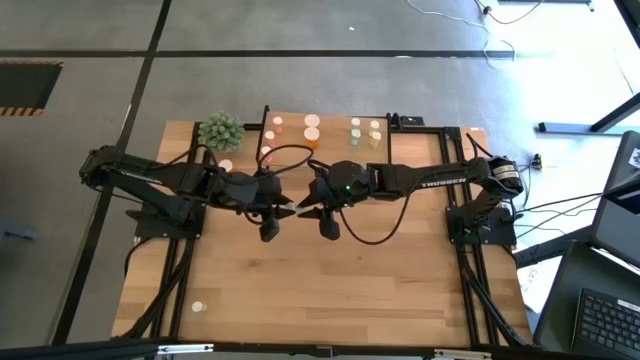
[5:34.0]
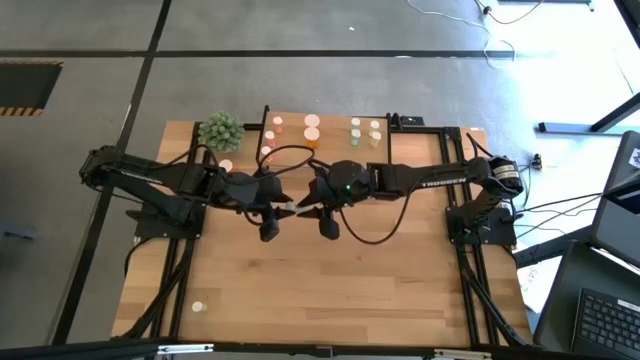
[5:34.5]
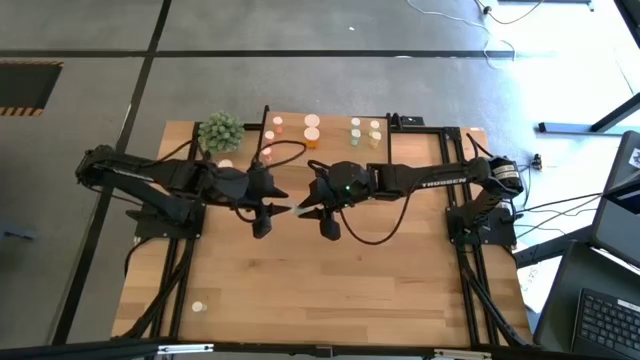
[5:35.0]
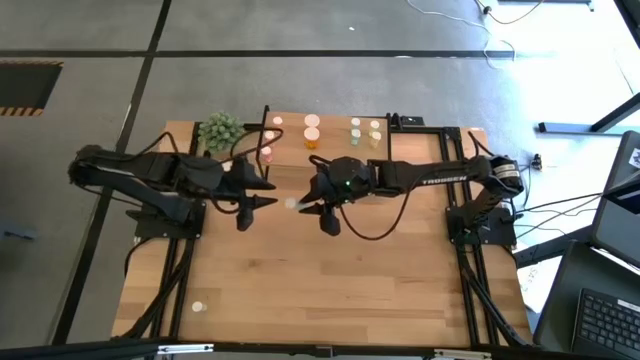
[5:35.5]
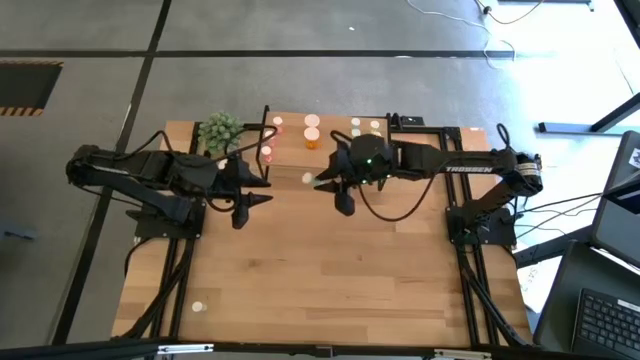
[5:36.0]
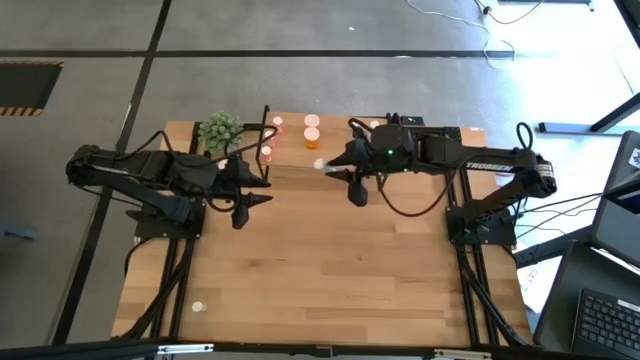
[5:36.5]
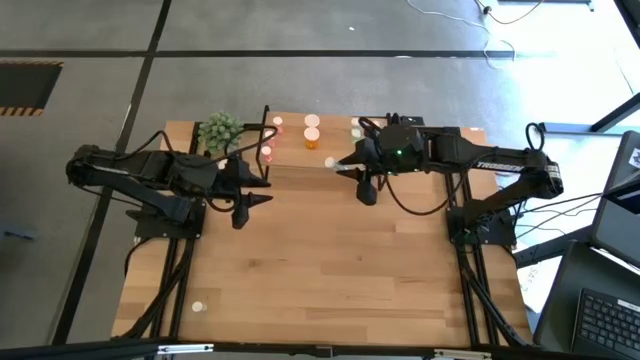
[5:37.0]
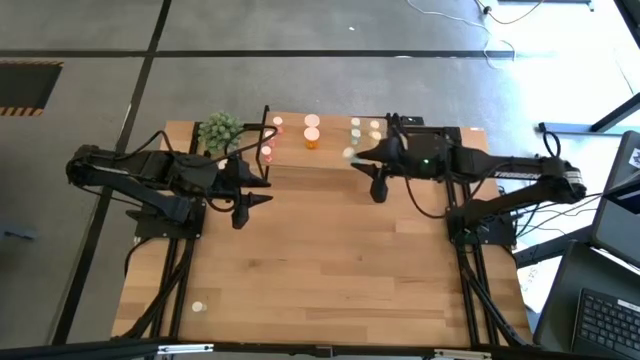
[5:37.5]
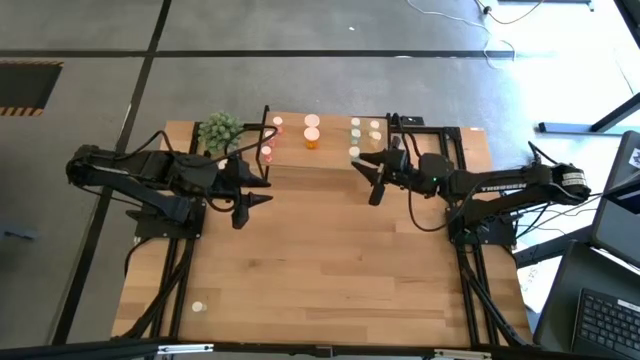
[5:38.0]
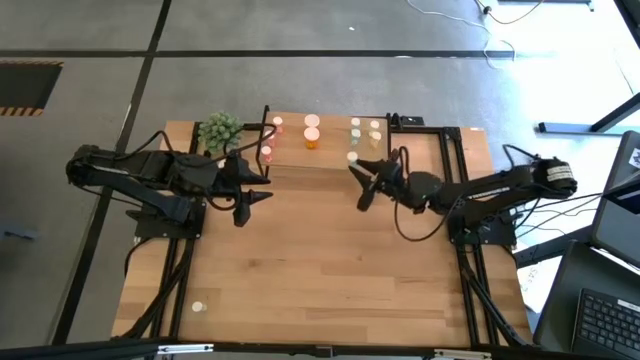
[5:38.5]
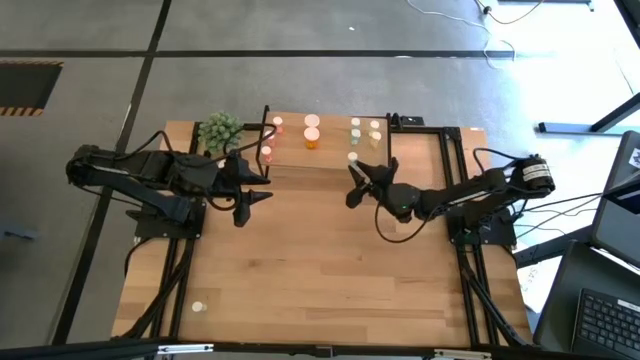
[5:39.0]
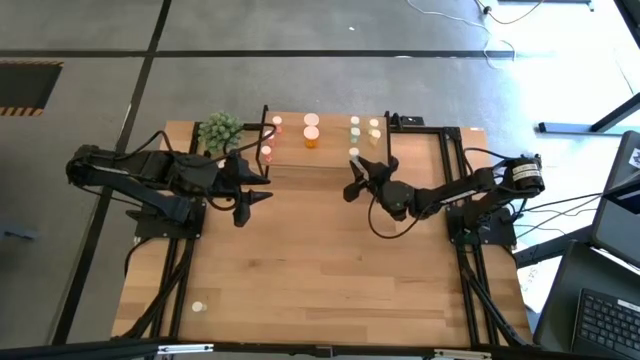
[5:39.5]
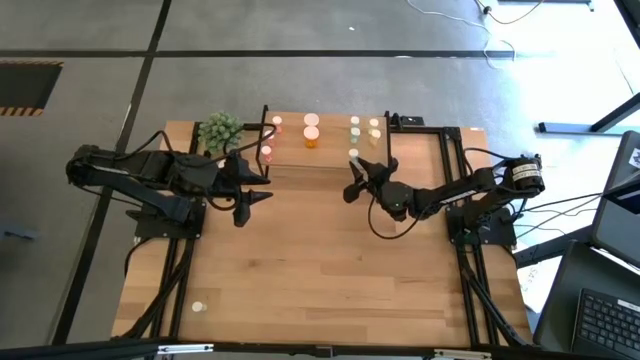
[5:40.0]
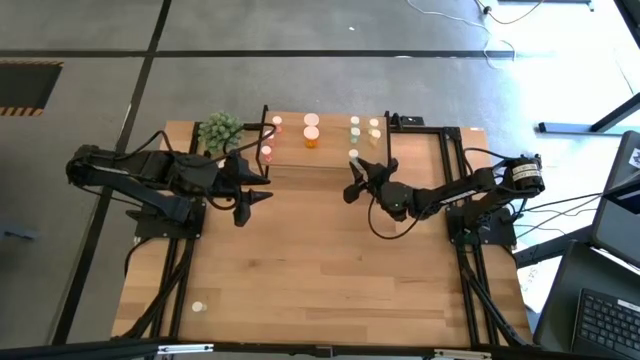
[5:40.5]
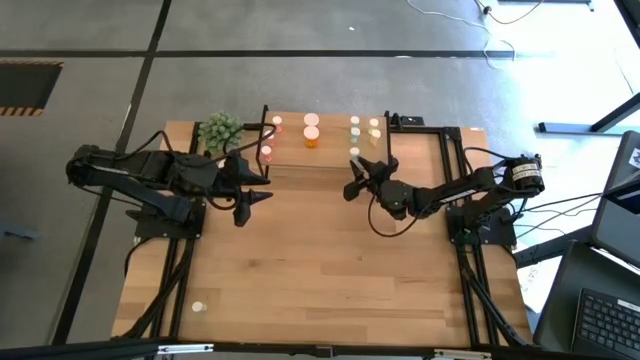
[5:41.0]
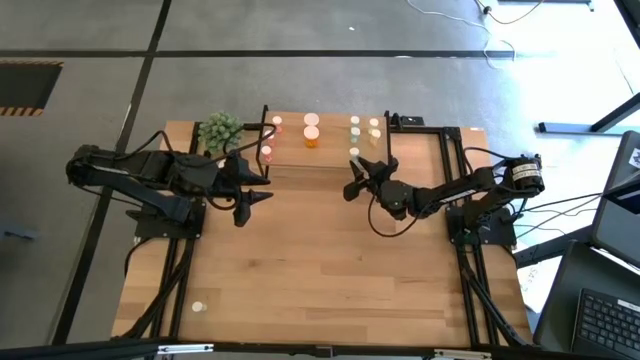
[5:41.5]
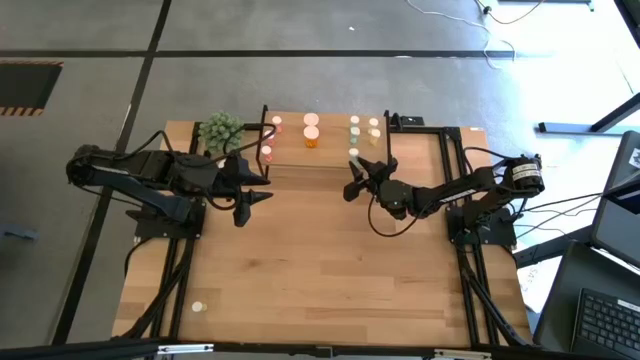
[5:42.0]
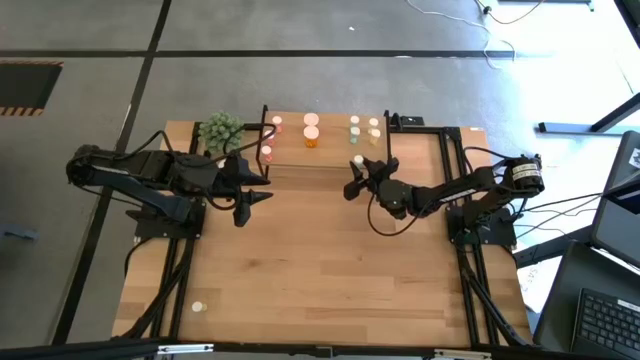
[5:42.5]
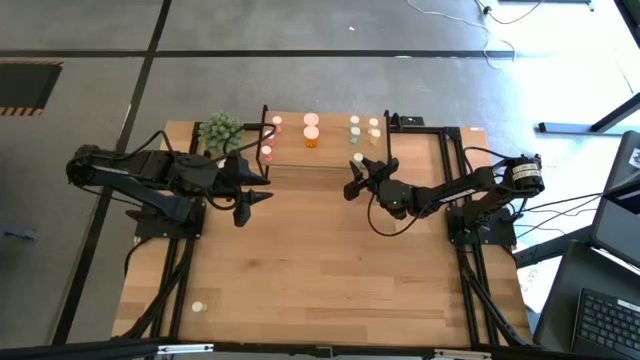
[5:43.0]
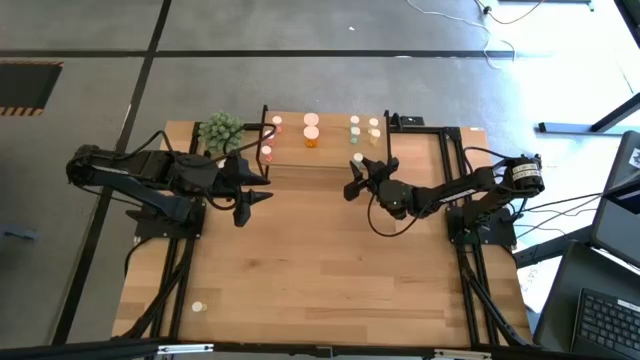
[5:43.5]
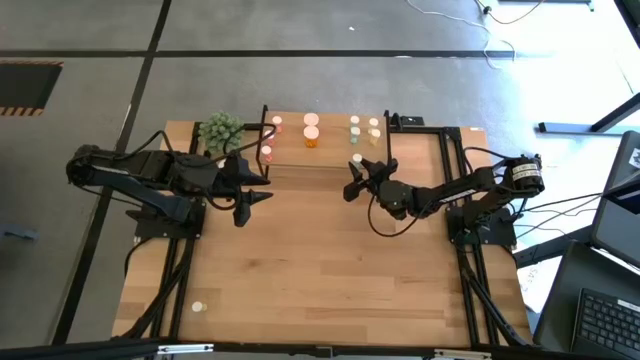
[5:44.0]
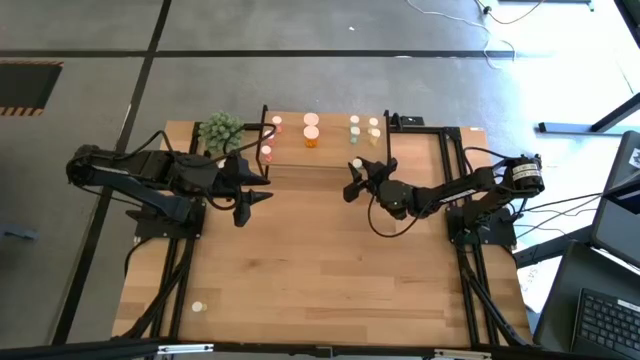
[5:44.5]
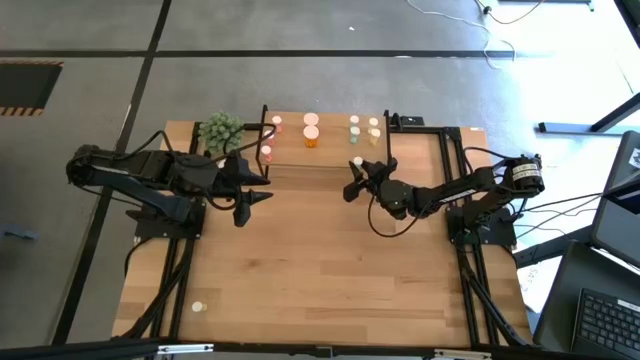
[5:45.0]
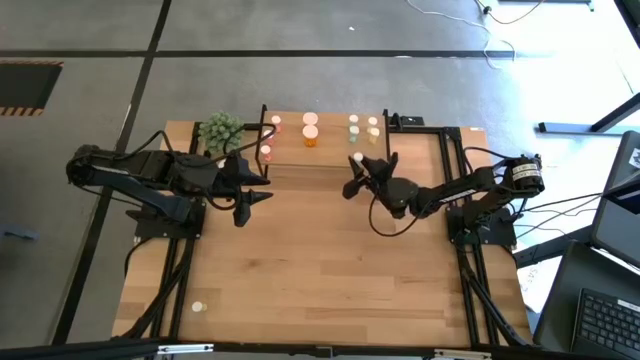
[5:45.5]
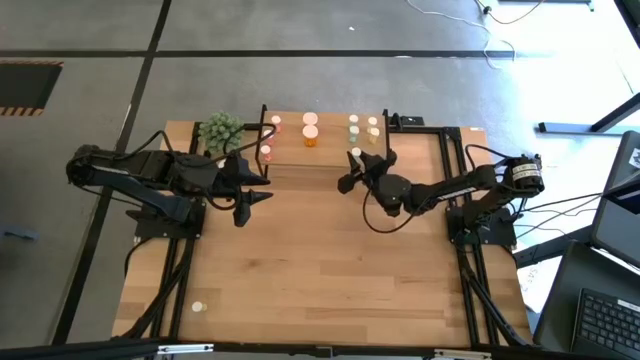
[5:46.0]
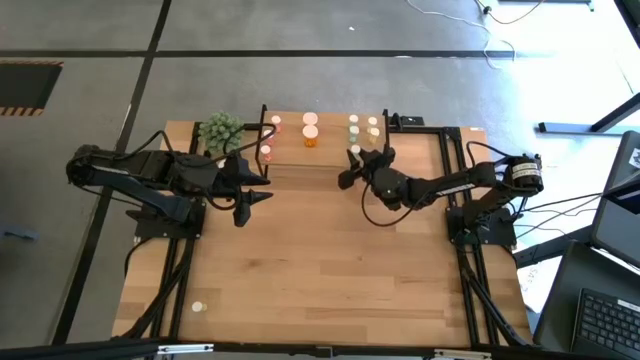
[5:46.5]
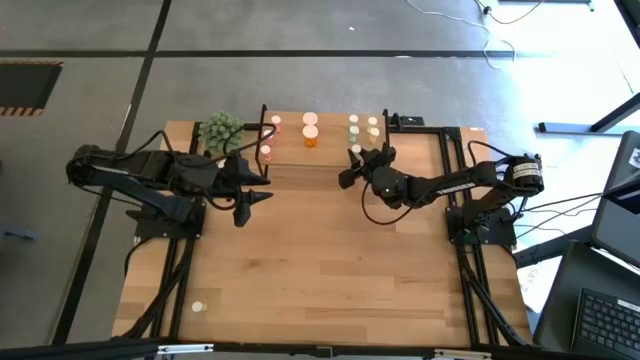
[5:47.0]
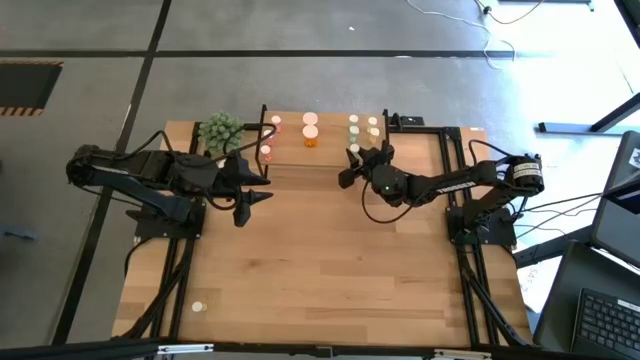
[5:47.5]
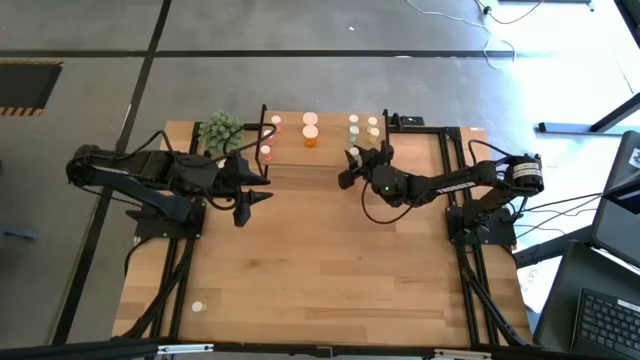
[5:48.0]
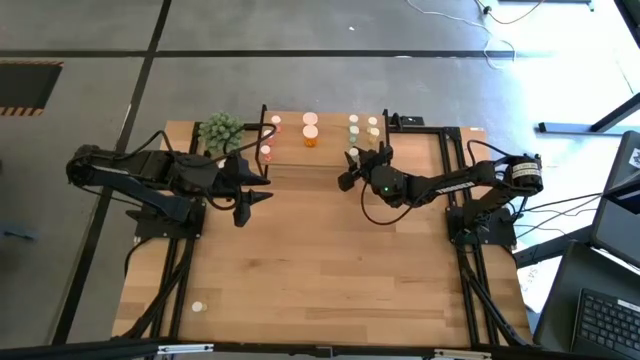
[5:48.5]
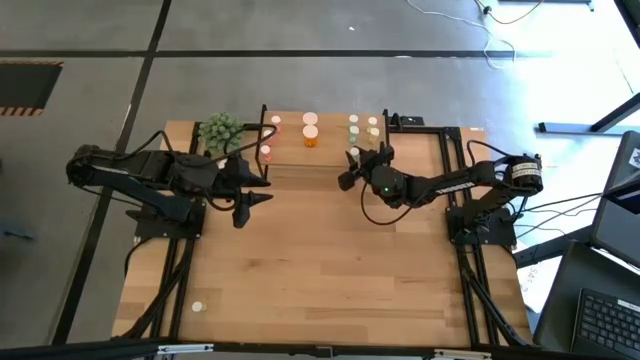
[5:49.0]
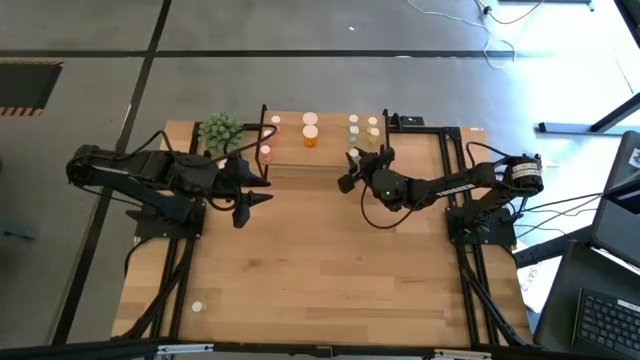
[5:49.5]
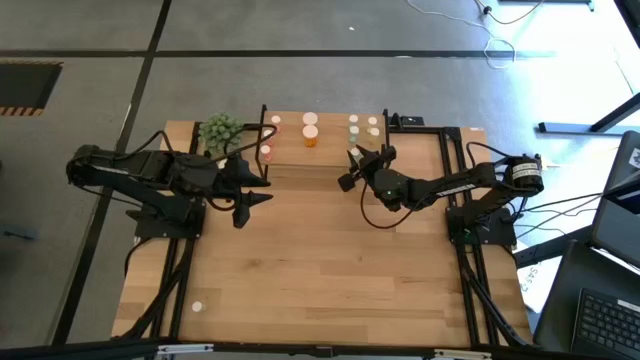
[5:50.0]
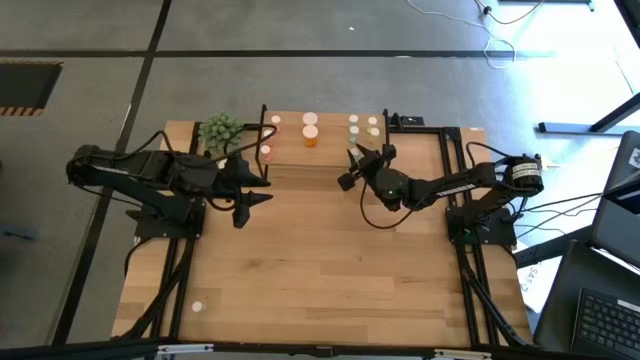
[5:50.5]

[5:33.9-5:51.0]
Task: Pick and place medicine bottles onto shelf by color
Put the blue medicine bottle on the shelf, aligned with the other blue medicine bottle
